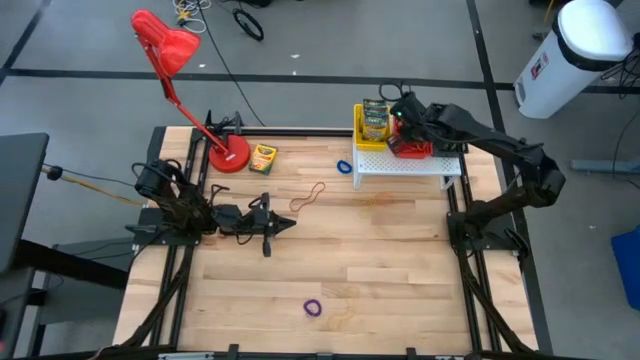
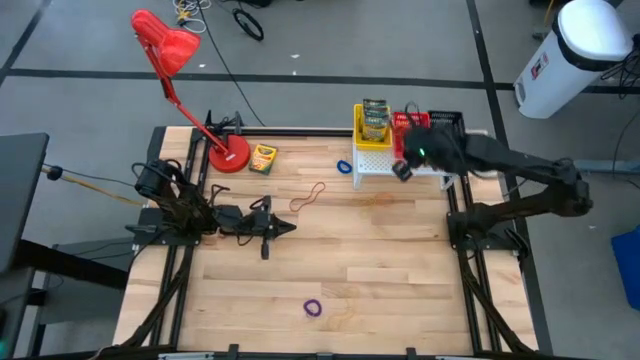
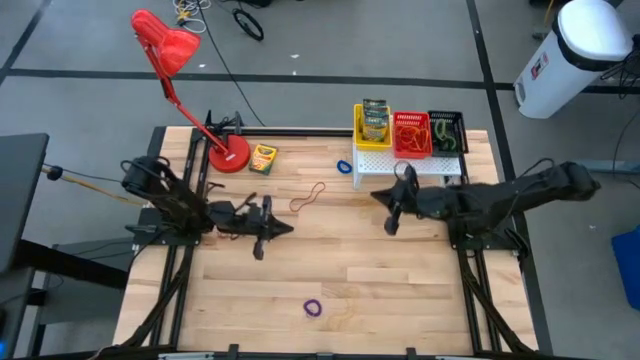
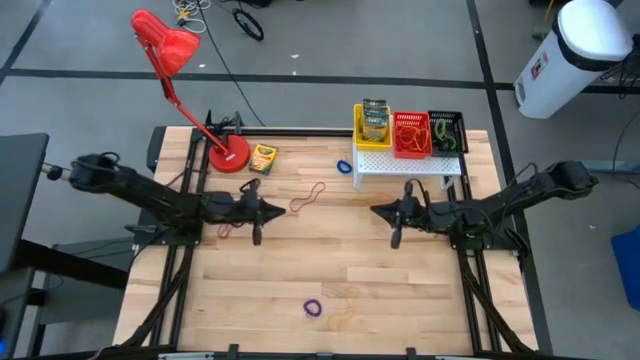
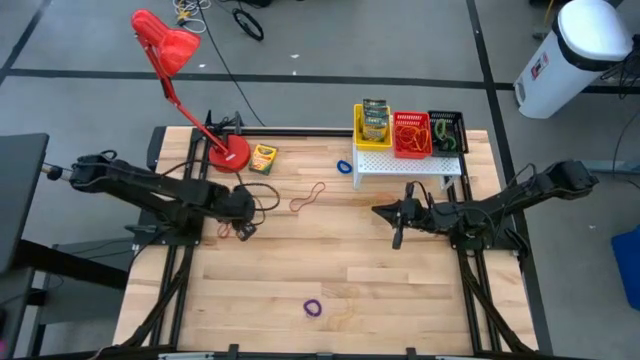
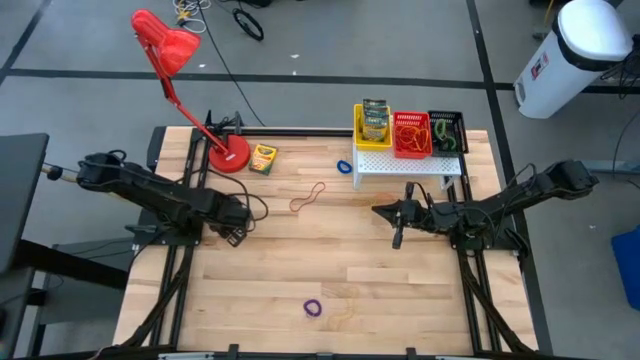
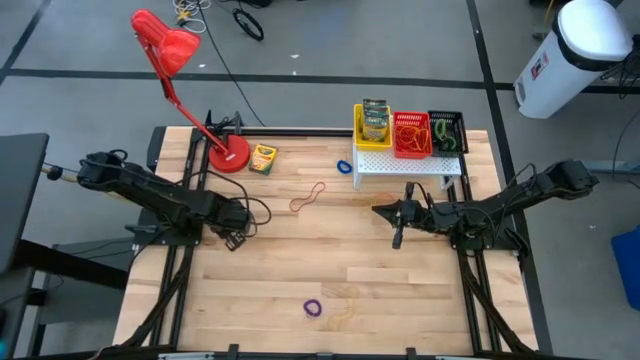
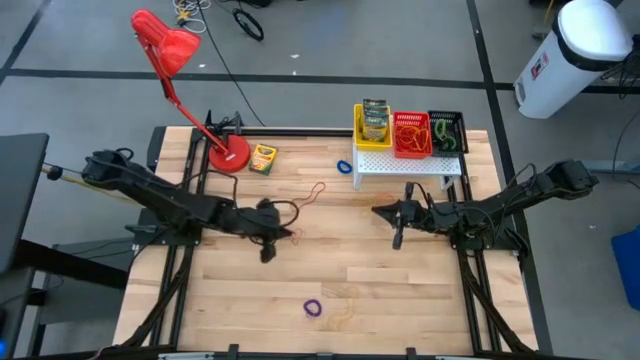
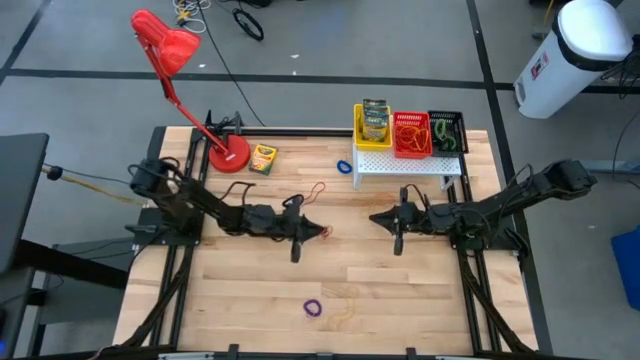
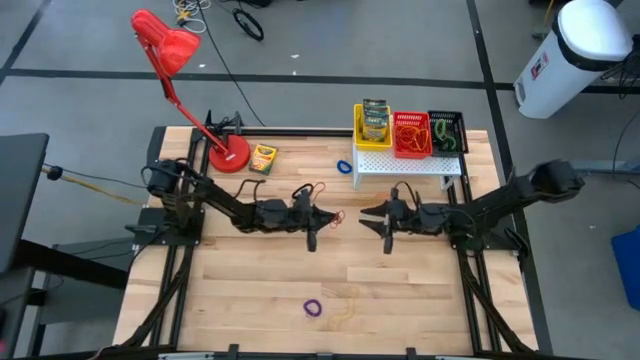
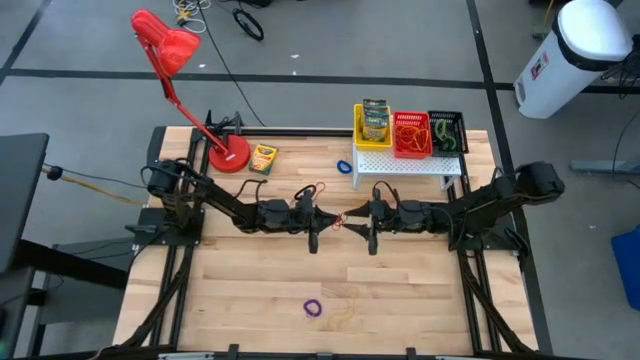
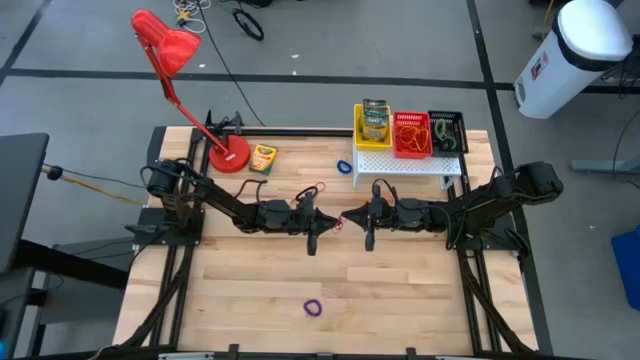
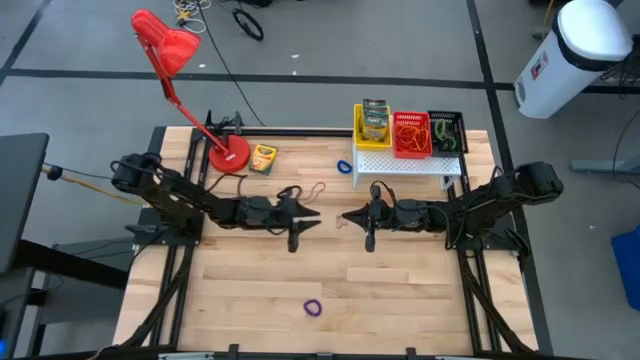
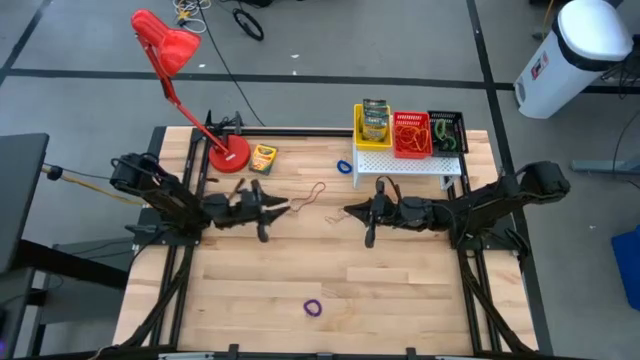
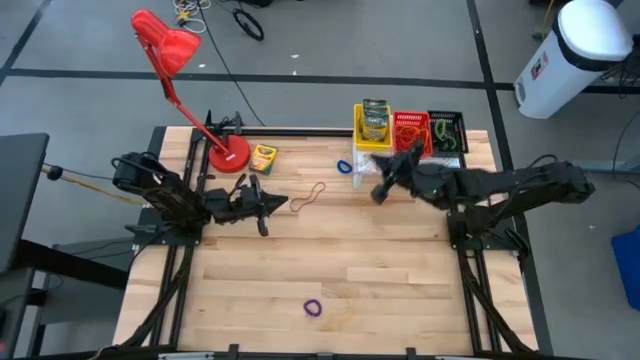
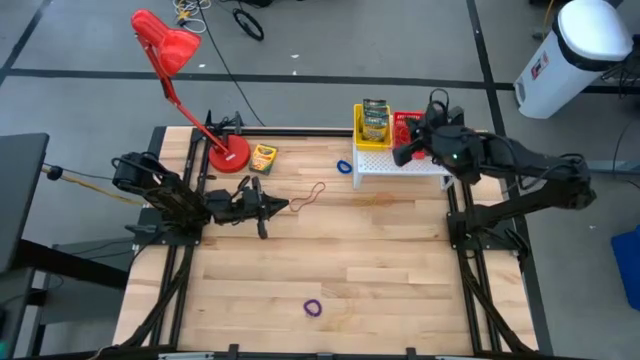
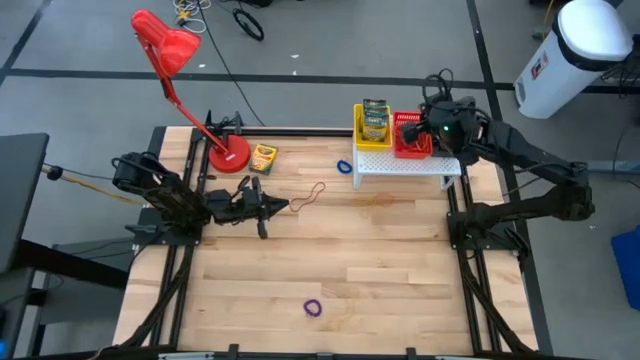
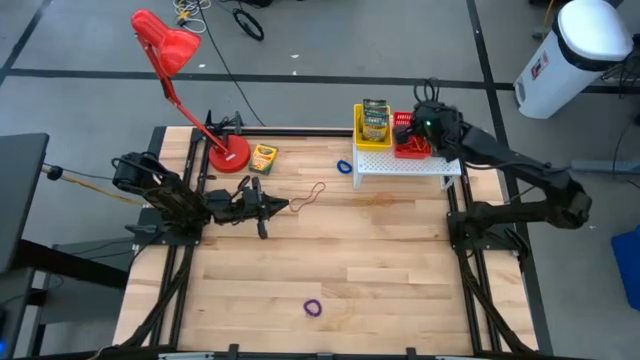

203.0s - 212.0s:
Task: Pick & Place Office Desk Supplies
Put the red rubber band on the red basket

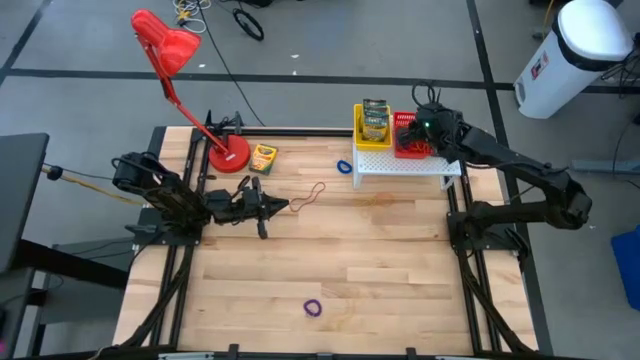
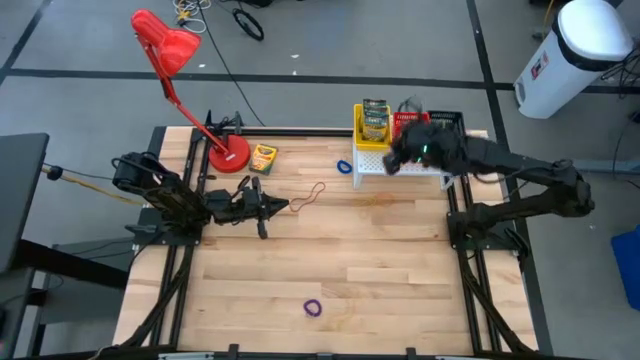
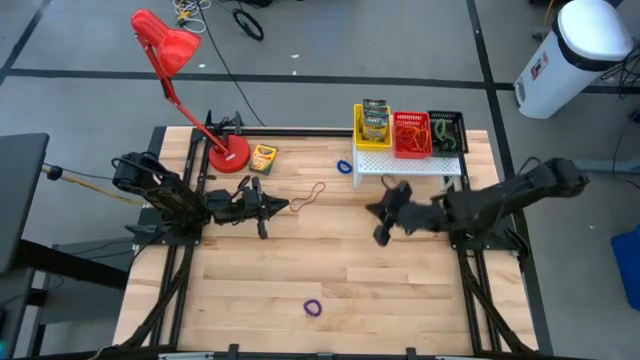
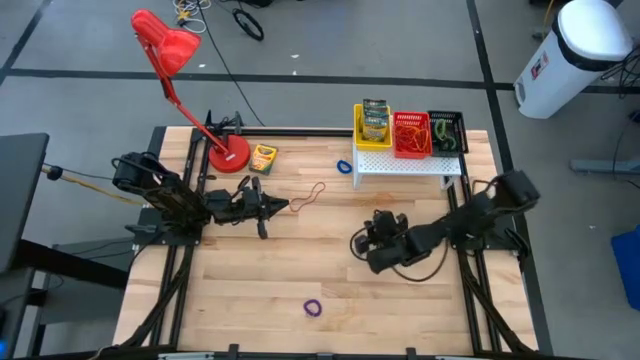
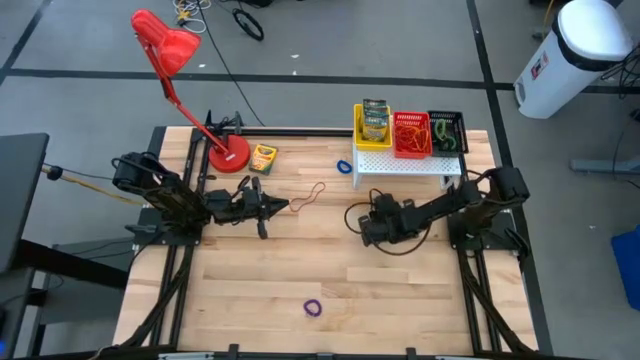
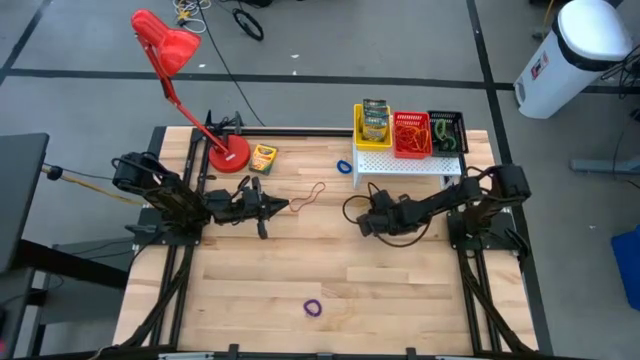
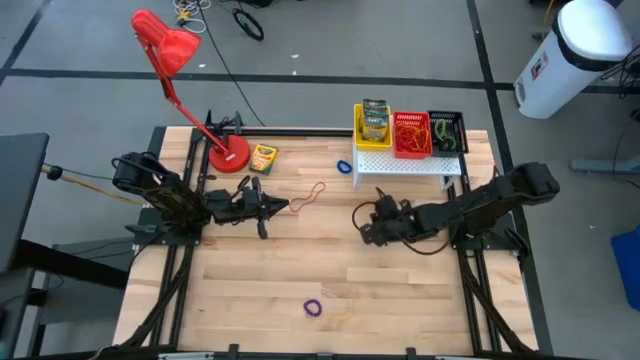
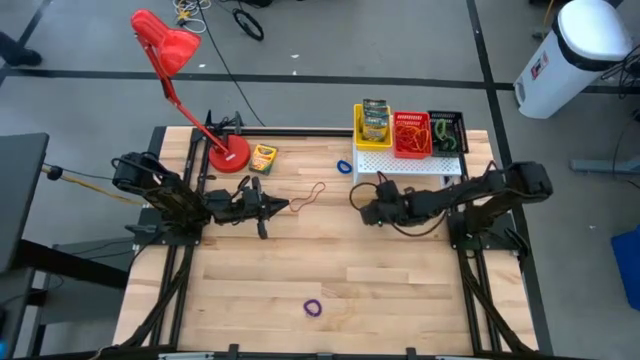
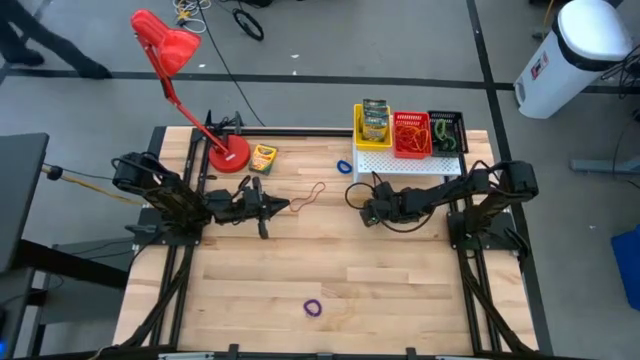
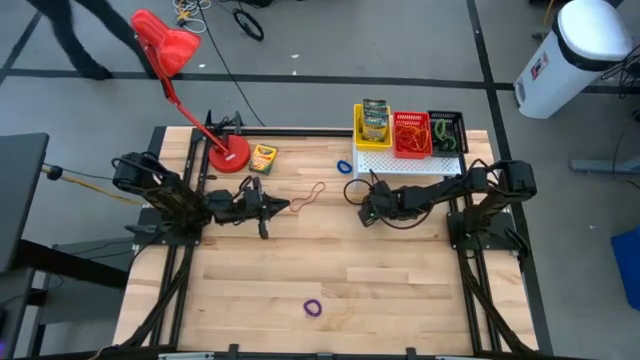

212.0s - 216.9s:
Put the orange rubber band on the red basket

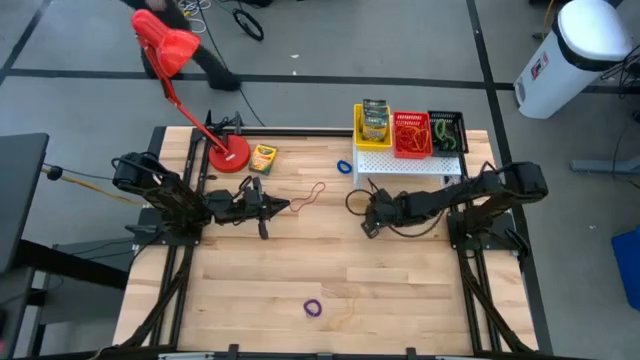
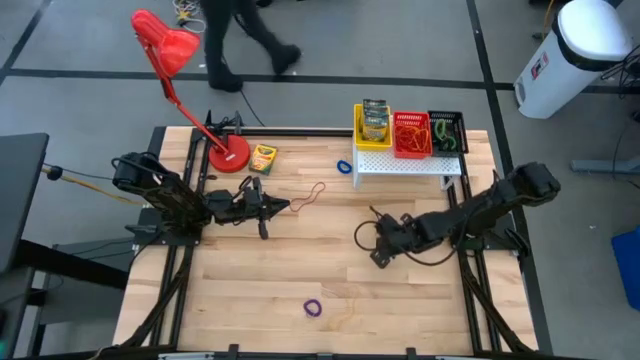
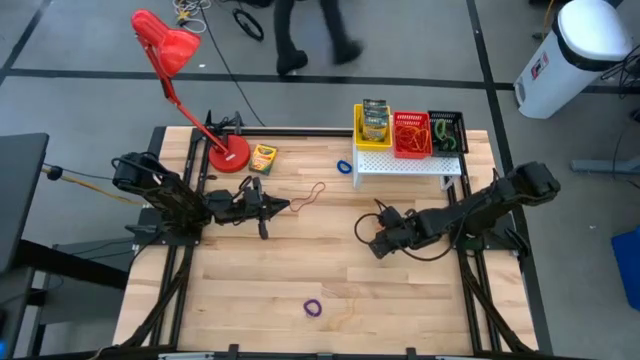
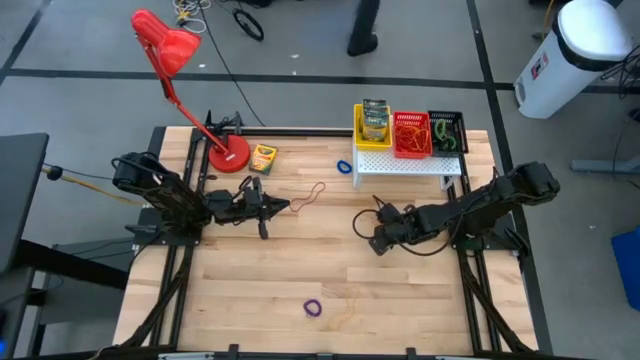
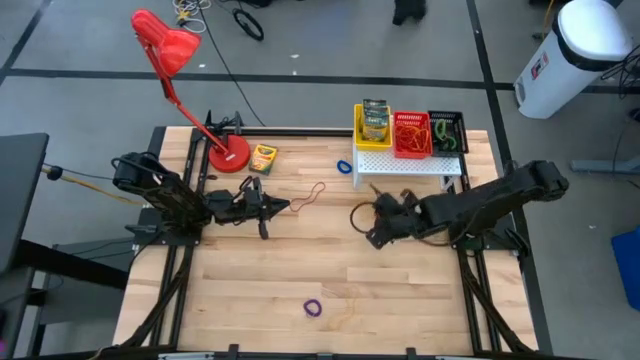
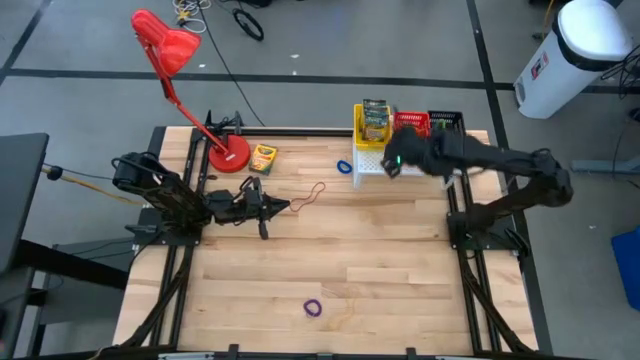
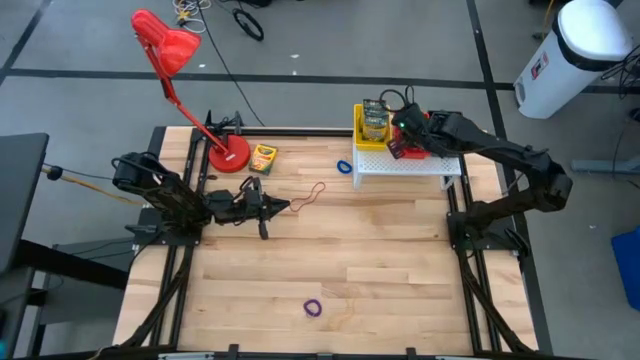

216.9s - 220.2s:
Put the orange rubber band on the red basket

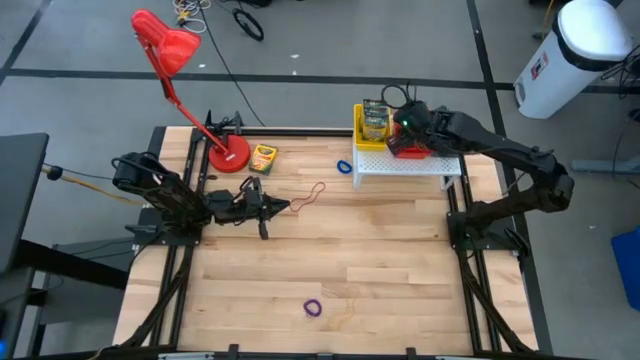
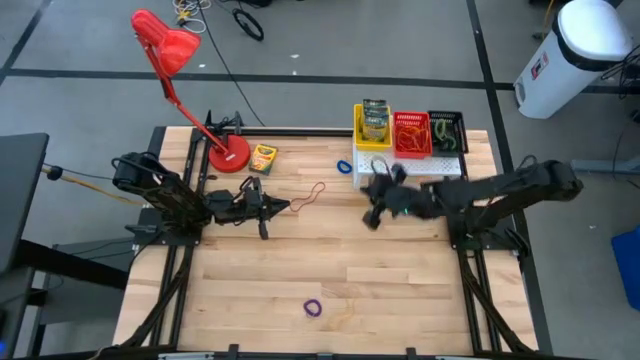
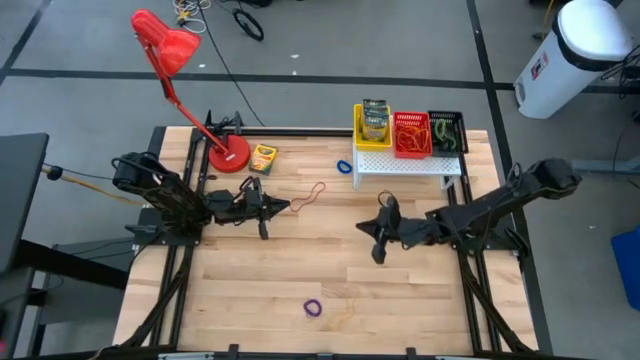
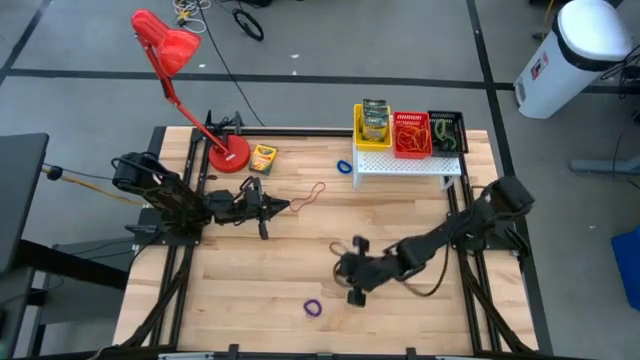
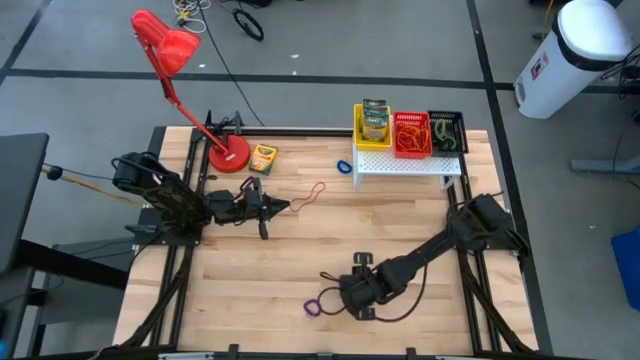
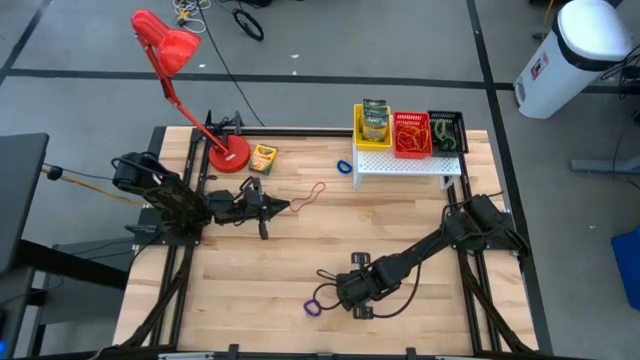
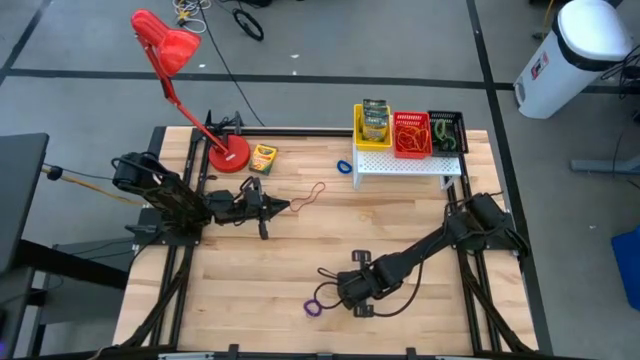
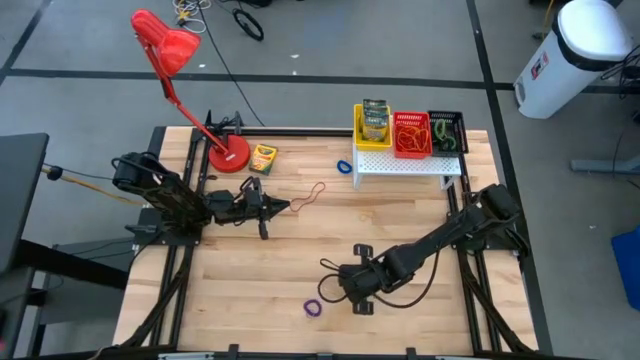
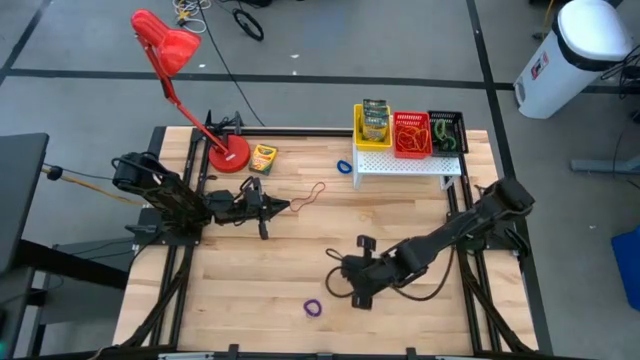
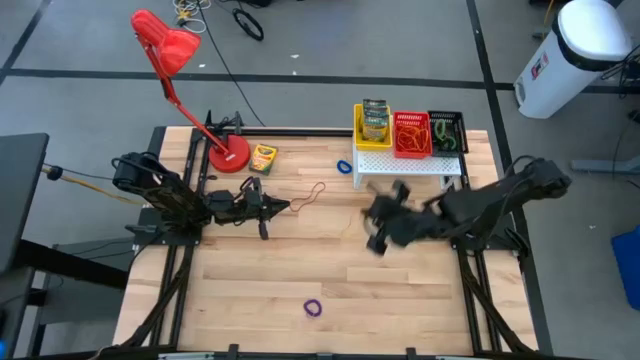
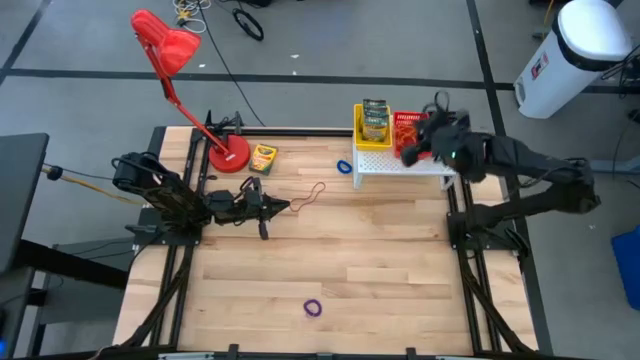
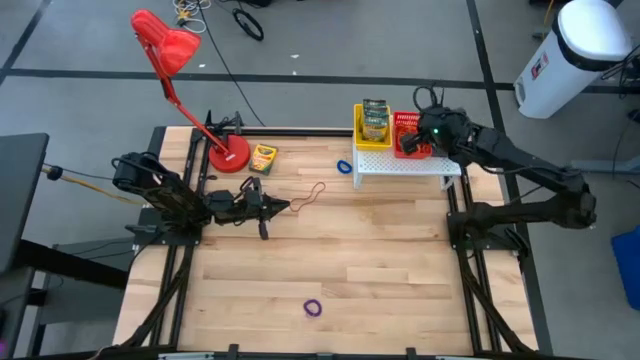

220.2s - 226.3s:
Put the yellow rubber band on the red basket
